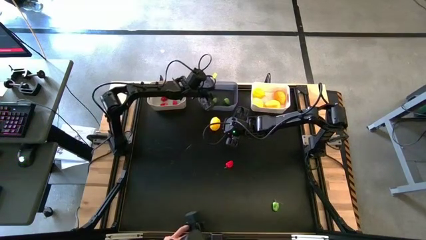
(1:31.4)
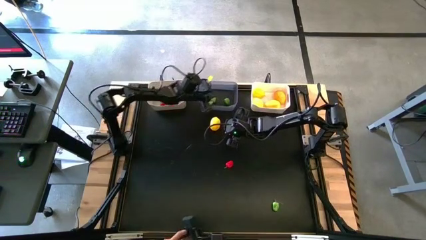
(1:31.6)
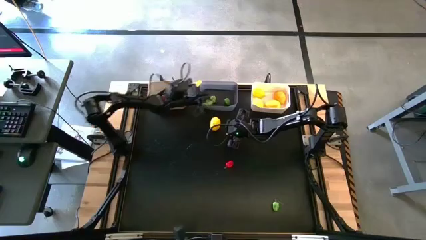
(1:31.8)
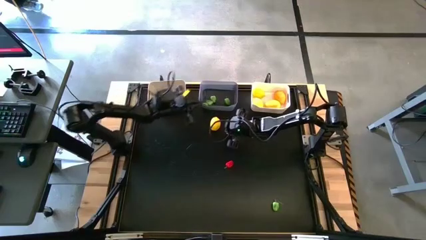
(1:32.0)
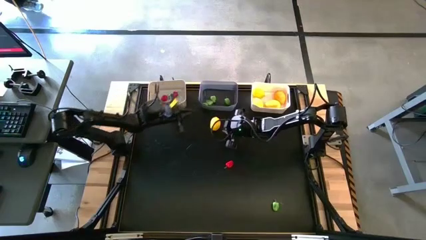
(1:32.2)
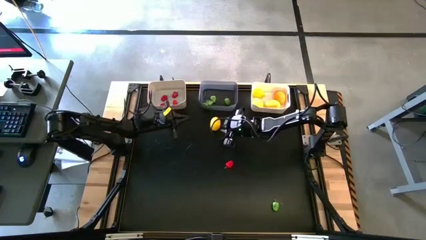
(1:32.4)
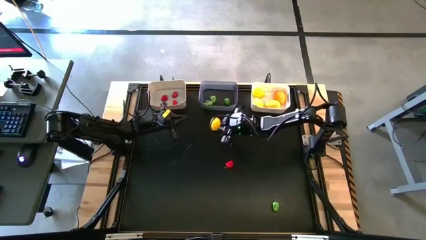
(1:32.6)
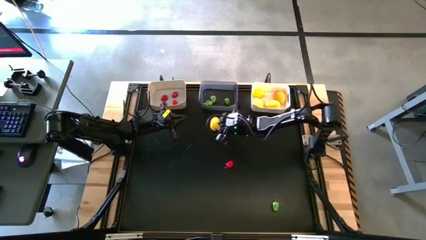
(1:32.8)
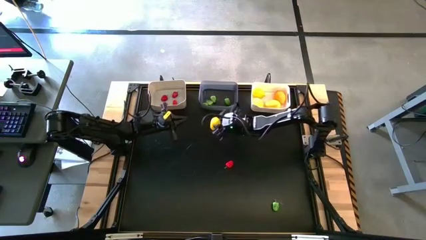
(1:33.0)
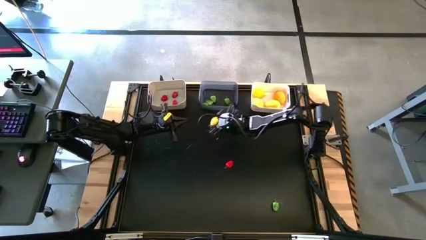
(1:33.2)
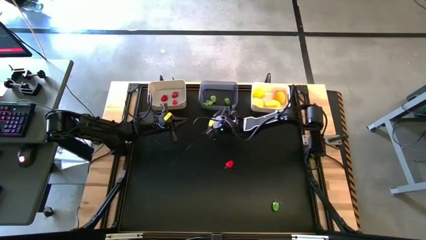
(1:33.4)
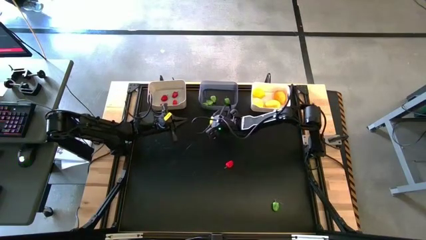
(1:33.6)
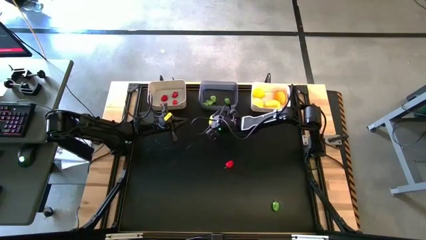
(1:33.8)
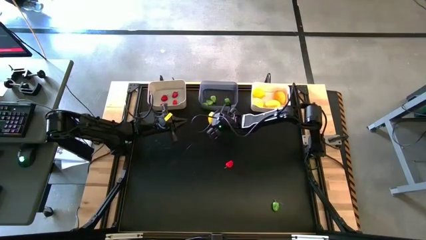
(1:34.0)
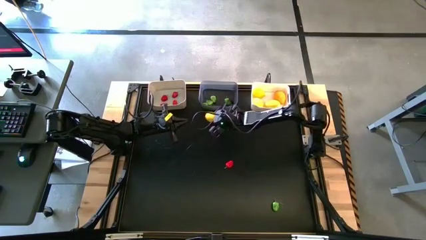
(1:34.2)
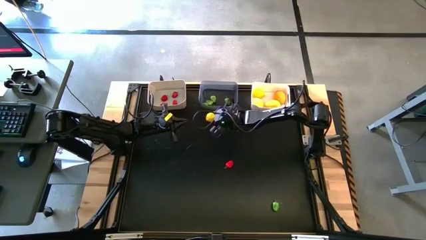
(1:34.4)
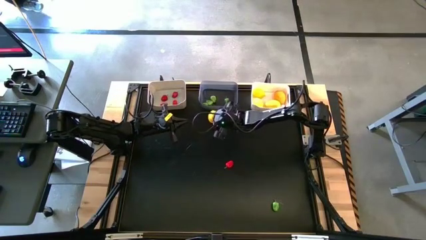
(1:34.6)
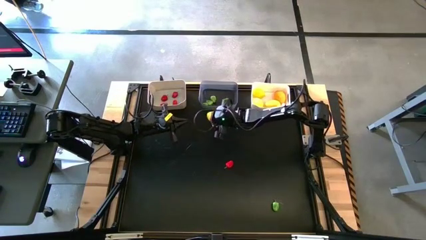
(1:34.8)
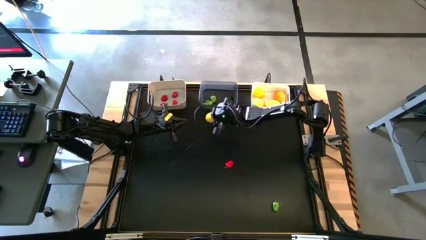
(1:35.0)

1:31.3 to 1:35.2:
Task: Sort produce into baskets
Put the lemon into the white bin

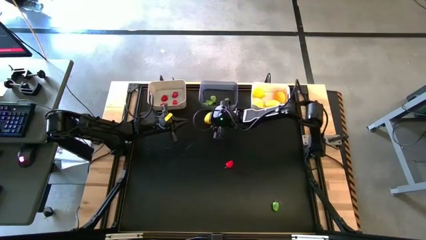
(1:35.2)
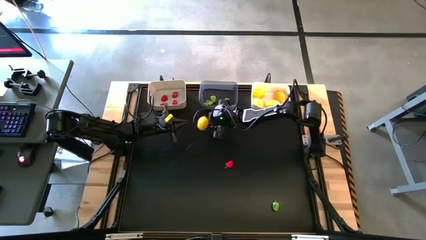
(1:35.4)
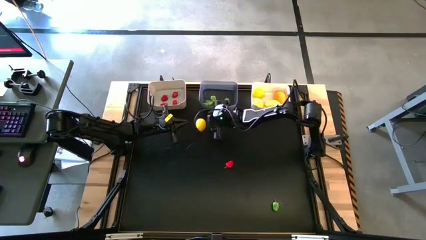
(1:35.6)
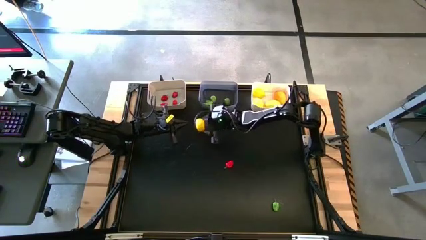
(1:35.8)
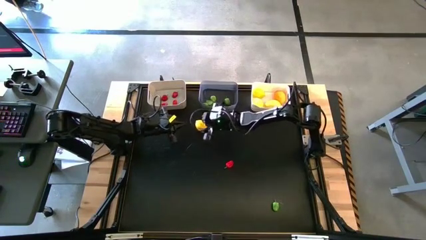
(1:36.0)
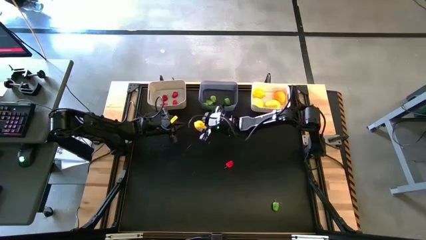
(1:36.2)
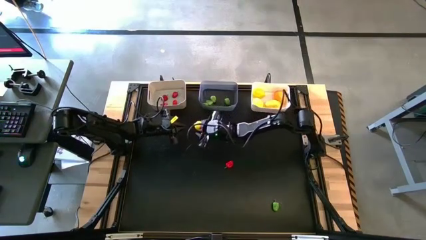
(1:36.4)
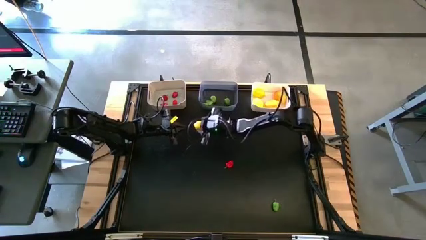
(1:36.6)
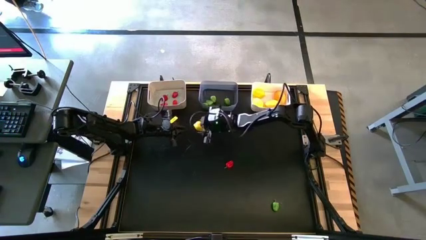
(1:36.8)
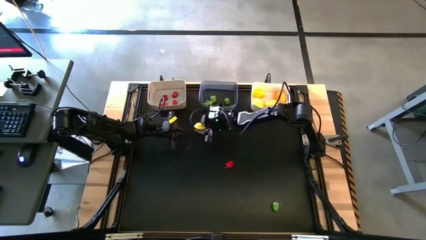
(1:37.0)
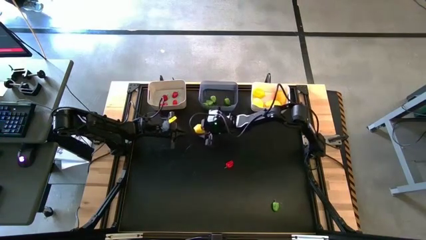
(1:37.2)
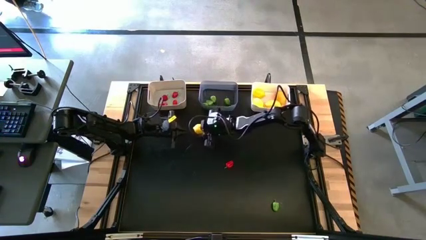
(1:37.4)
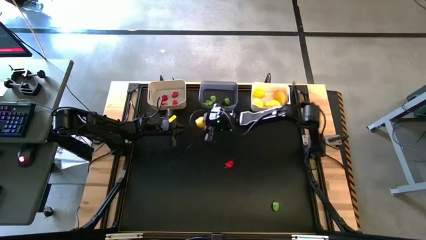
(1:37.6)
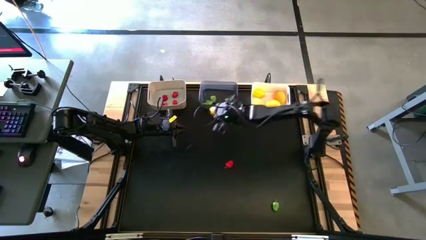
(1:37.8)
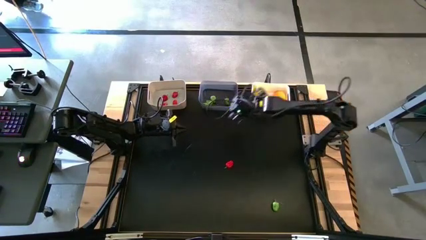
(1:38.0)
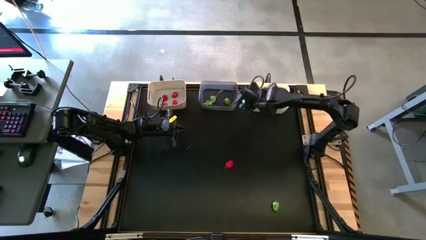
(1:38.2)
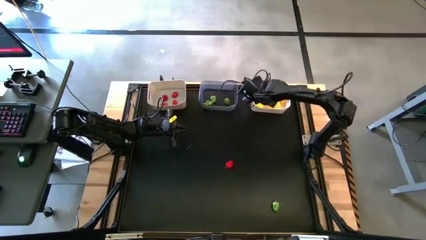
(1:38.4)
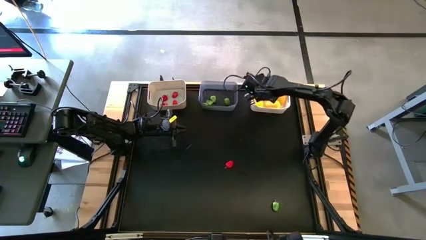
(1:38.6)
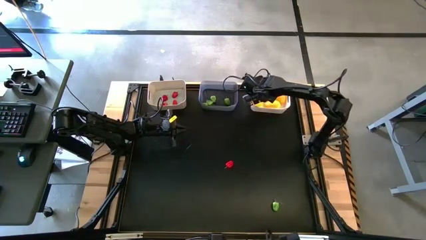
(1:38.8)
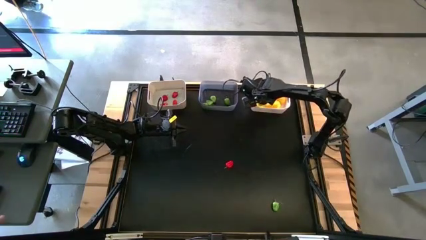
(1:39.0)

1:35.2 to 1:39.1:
Put the lemon into the white bin

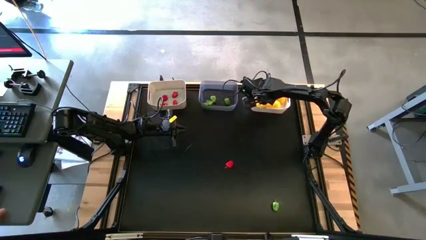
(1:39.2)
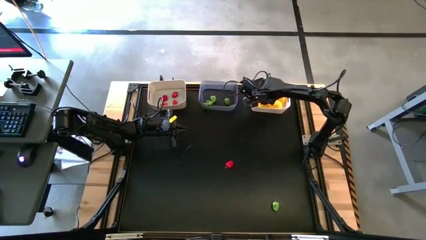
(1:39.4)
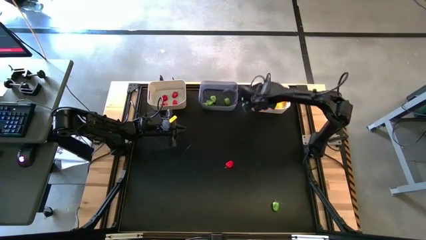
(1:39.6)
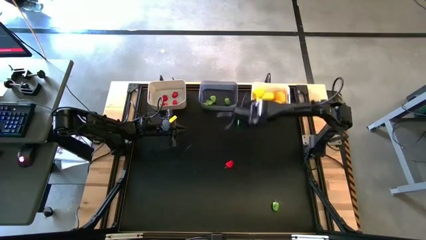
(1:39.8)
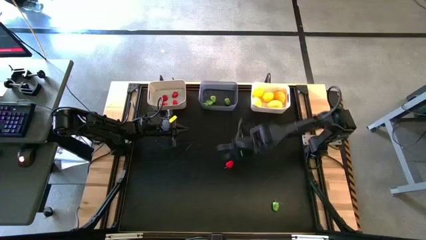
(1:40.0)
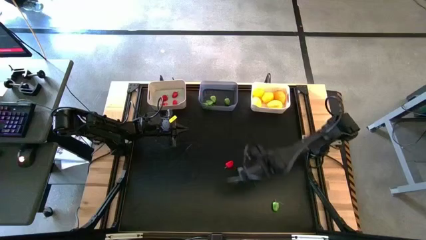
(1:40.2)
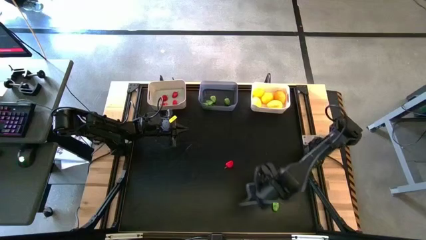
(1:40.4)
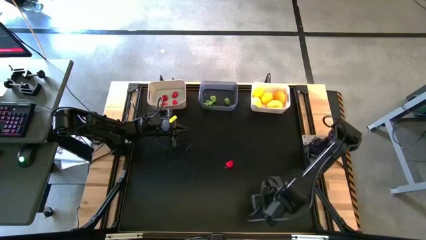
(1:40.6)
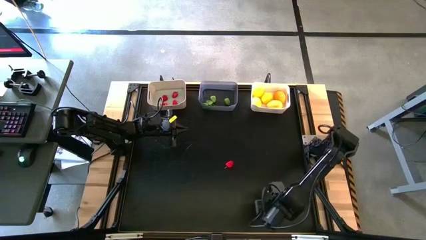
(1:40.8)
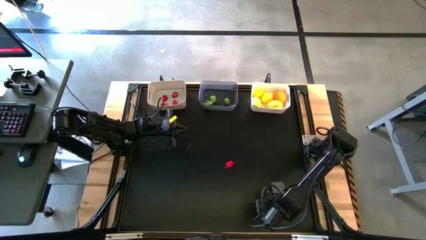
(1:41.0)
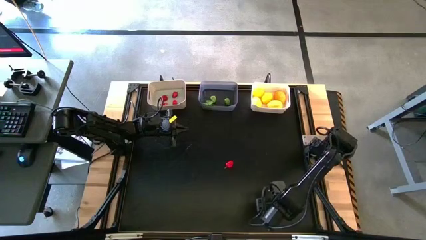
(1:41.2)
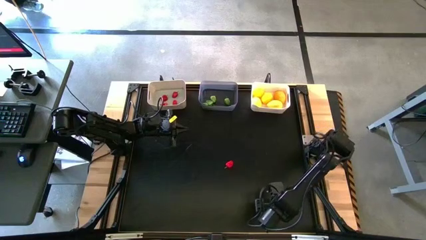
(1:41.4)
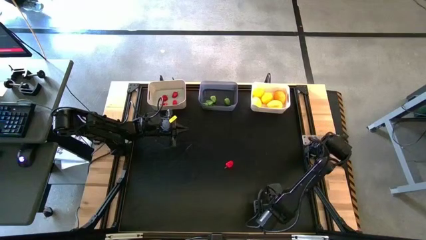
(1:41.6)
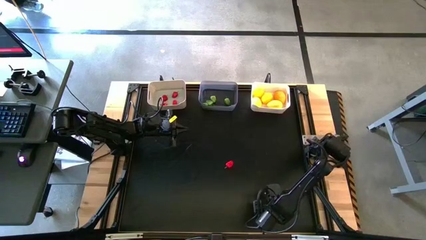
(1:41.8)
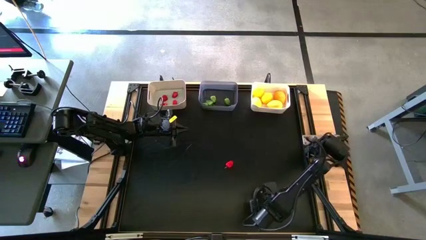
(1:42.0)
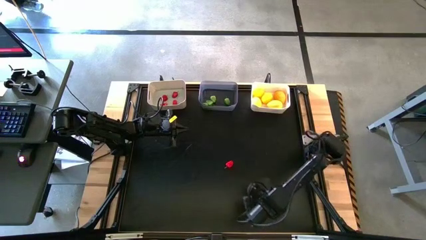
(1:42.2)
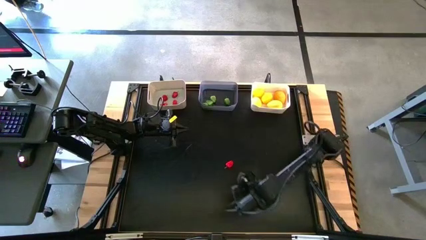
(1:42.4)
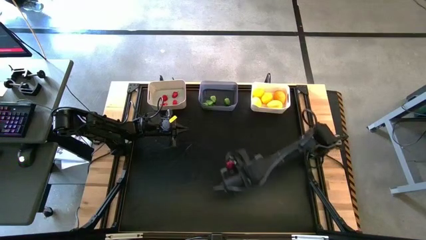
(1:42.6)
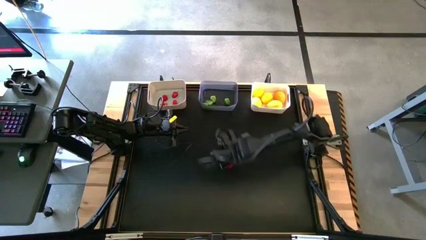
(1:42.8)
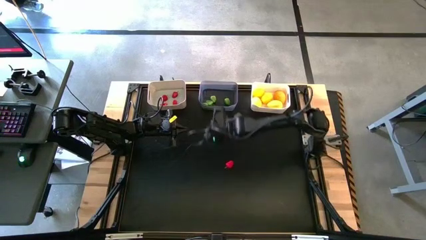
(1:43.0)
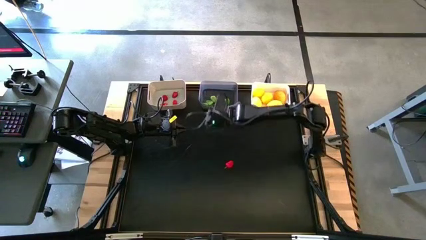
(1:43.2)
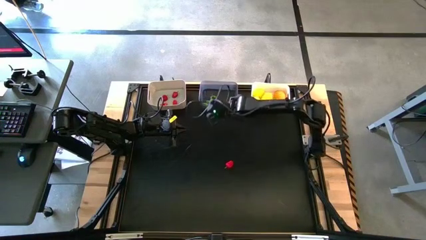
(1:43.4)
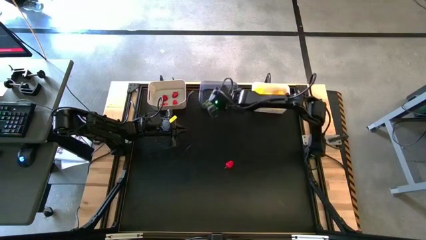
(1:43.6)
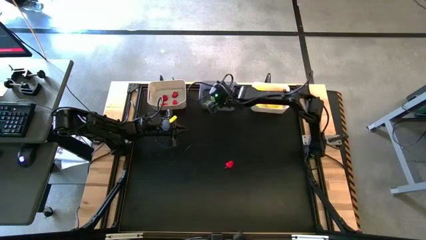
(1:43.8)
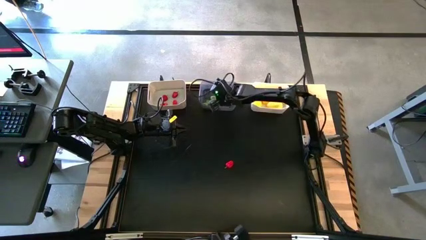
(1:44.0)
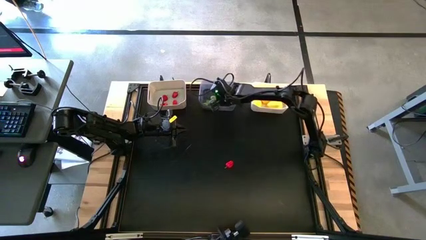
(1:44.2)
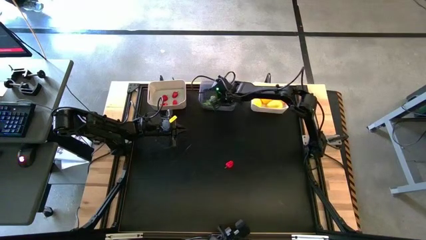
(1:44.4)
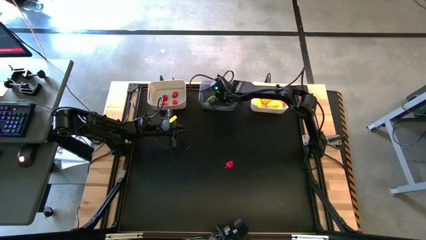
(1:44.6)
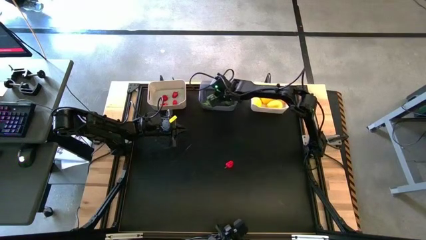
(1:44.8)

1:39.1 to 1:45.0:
Put the green bell pepper into the transparent bin
